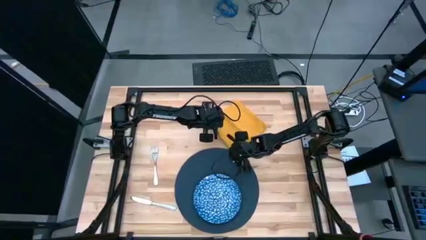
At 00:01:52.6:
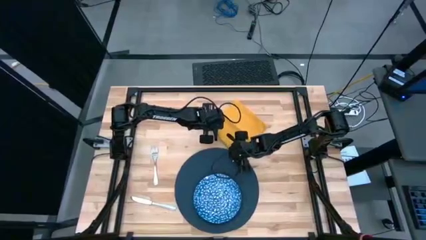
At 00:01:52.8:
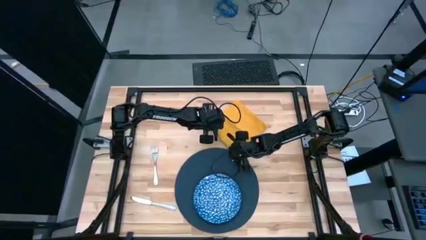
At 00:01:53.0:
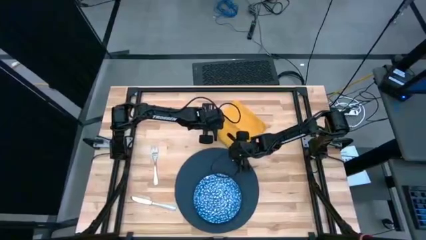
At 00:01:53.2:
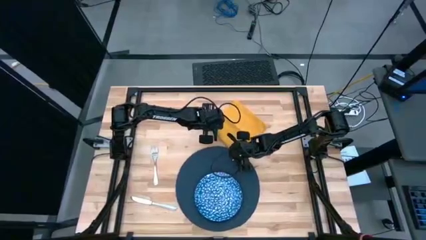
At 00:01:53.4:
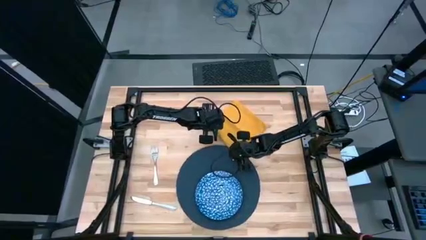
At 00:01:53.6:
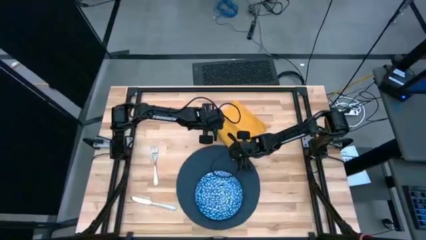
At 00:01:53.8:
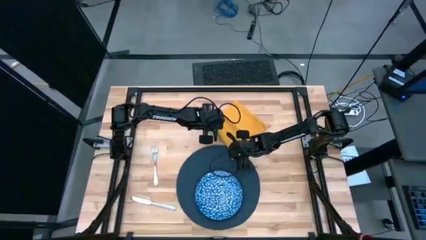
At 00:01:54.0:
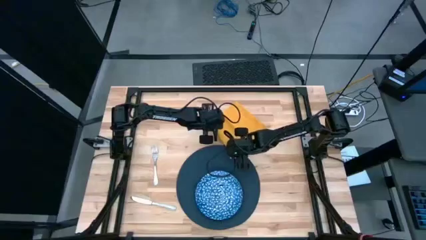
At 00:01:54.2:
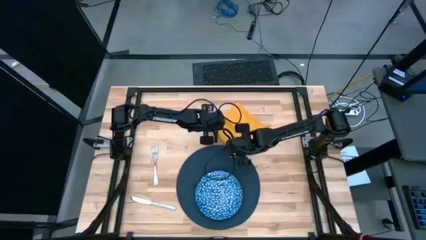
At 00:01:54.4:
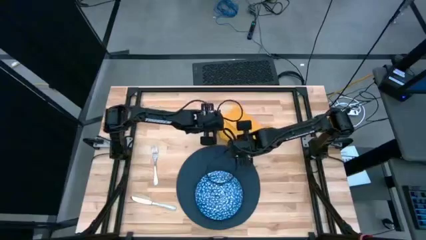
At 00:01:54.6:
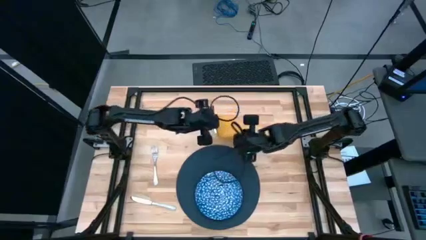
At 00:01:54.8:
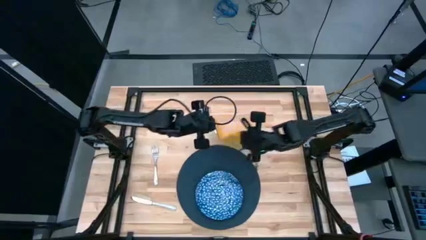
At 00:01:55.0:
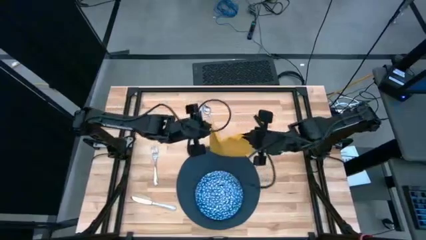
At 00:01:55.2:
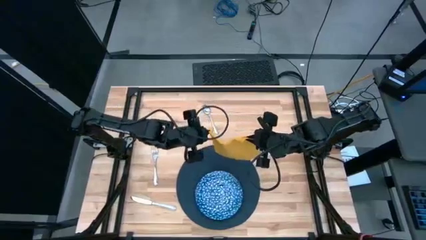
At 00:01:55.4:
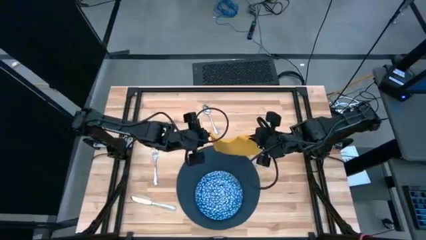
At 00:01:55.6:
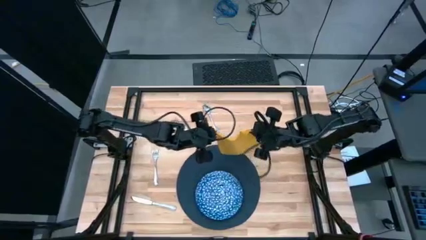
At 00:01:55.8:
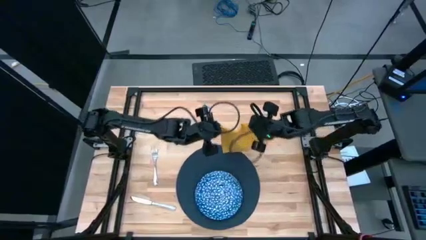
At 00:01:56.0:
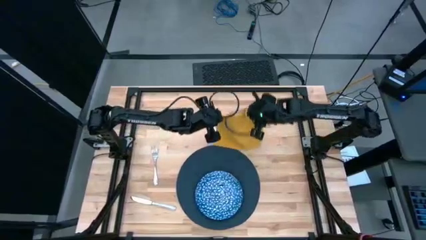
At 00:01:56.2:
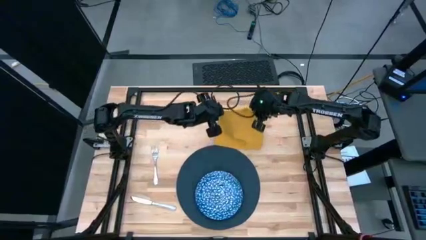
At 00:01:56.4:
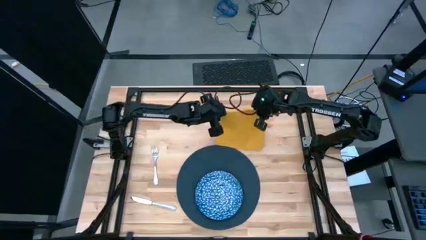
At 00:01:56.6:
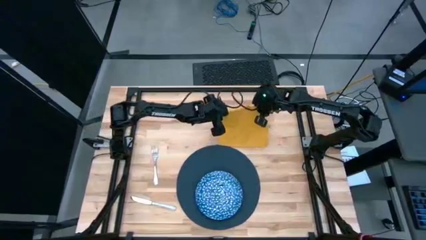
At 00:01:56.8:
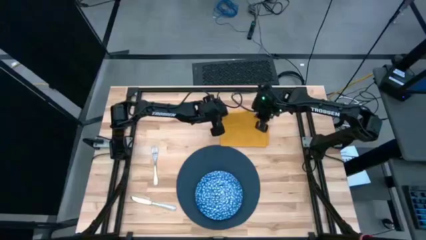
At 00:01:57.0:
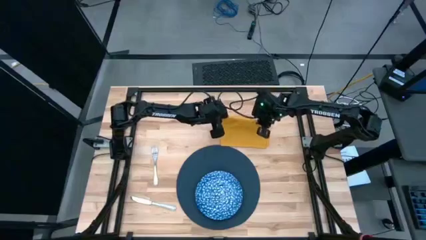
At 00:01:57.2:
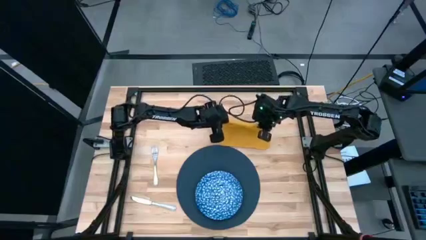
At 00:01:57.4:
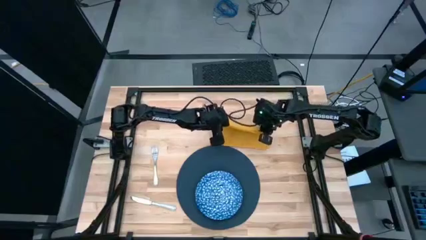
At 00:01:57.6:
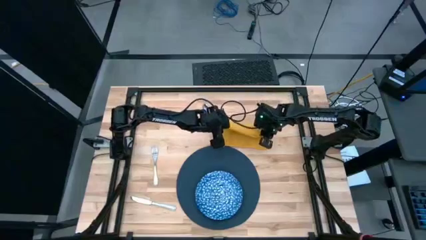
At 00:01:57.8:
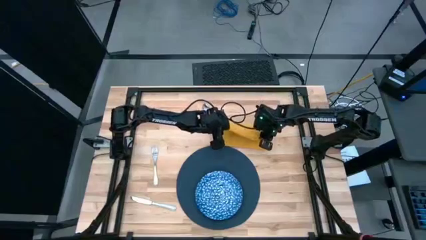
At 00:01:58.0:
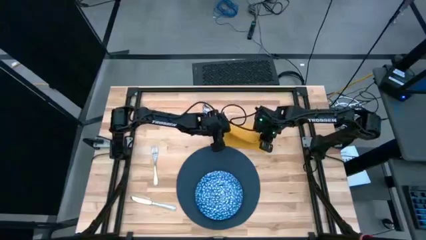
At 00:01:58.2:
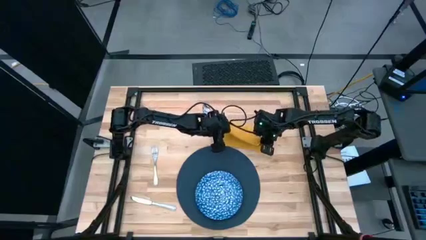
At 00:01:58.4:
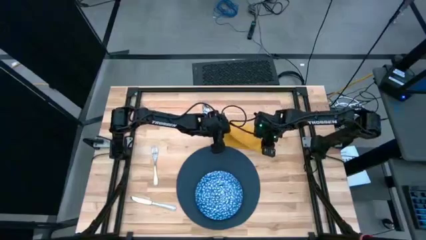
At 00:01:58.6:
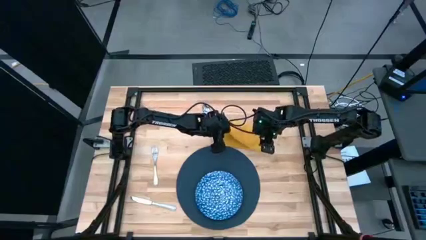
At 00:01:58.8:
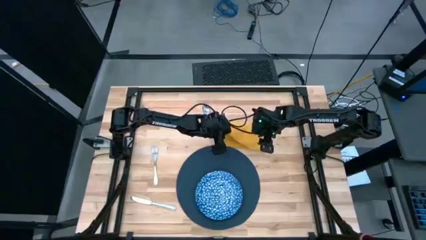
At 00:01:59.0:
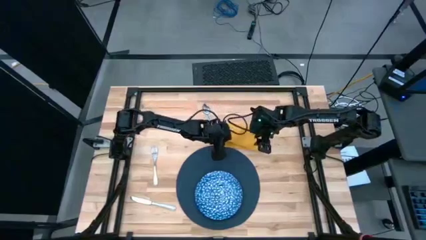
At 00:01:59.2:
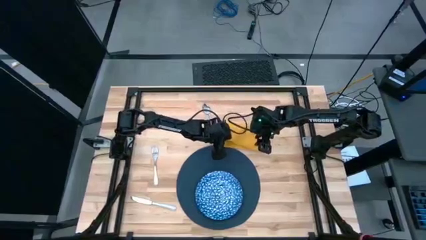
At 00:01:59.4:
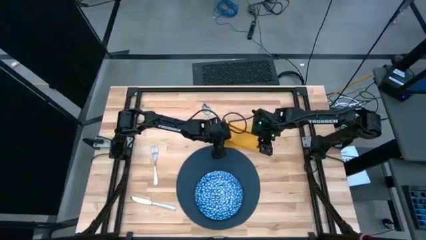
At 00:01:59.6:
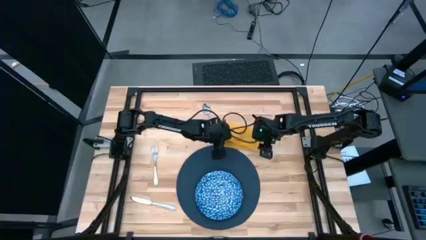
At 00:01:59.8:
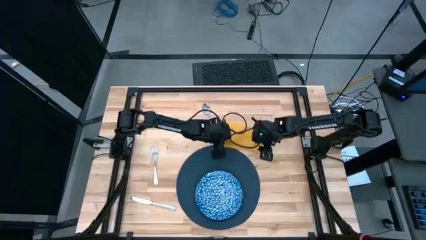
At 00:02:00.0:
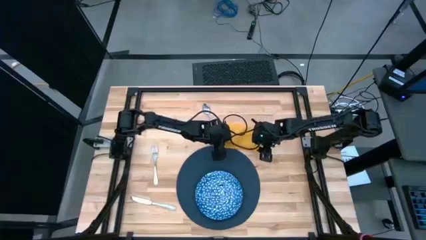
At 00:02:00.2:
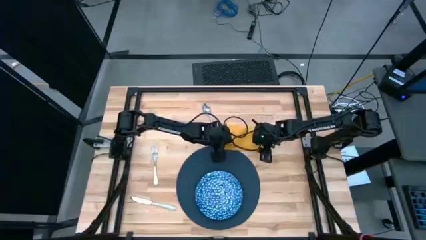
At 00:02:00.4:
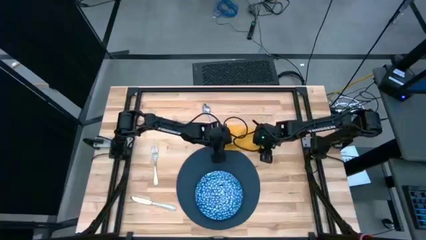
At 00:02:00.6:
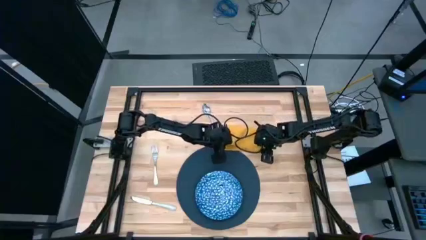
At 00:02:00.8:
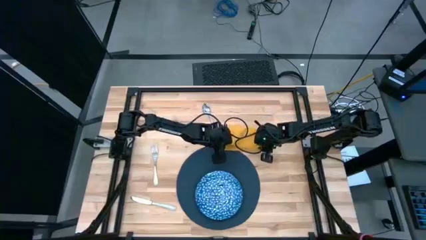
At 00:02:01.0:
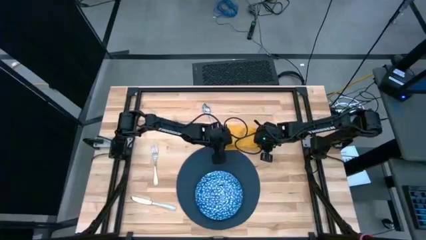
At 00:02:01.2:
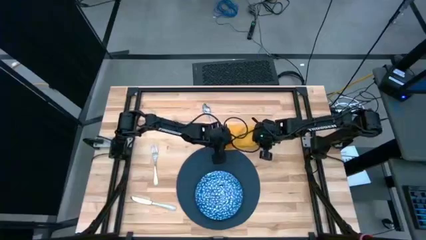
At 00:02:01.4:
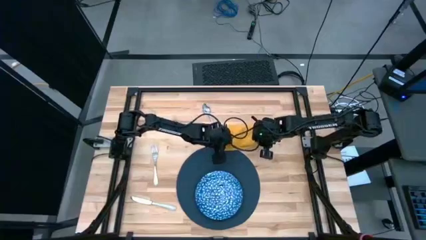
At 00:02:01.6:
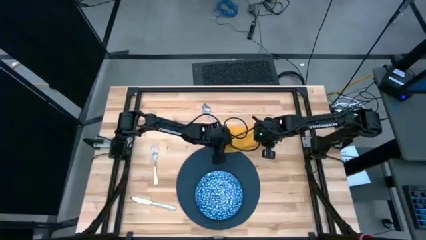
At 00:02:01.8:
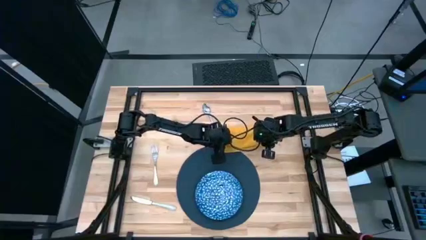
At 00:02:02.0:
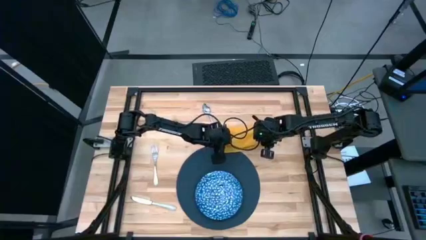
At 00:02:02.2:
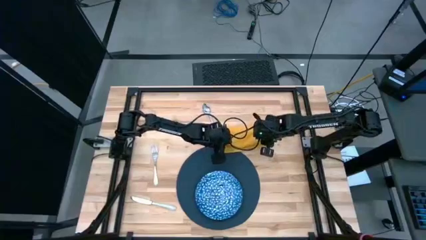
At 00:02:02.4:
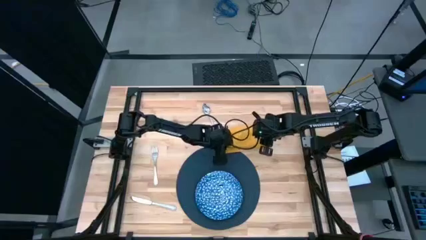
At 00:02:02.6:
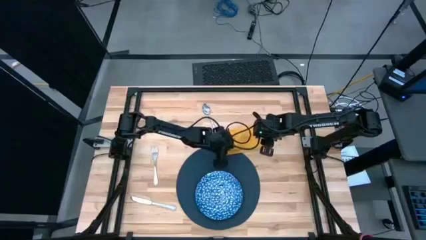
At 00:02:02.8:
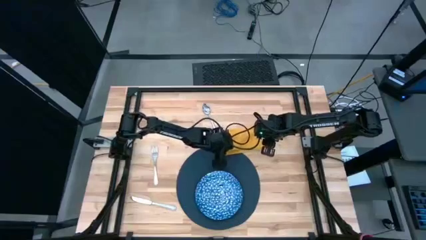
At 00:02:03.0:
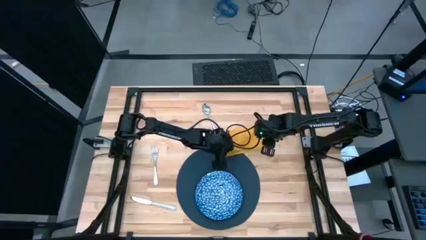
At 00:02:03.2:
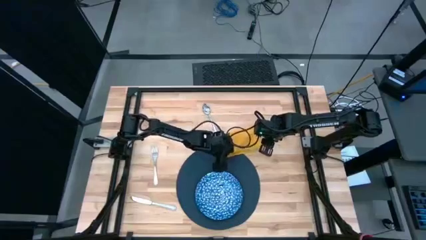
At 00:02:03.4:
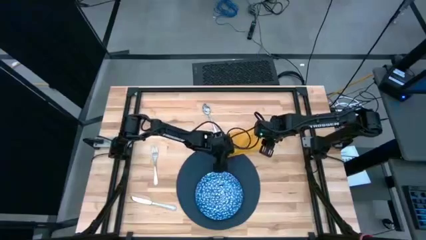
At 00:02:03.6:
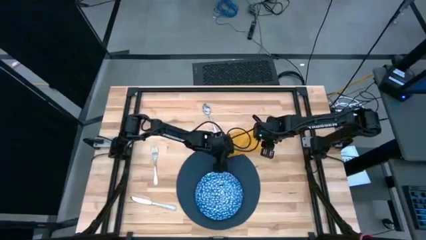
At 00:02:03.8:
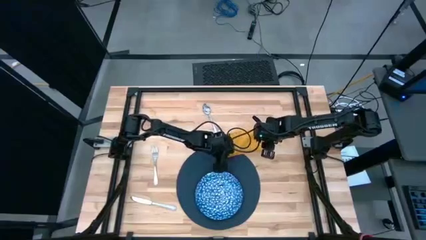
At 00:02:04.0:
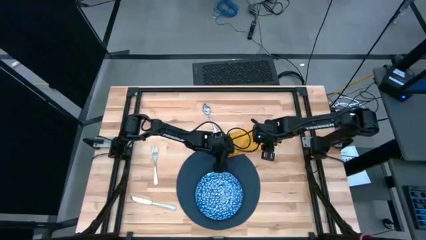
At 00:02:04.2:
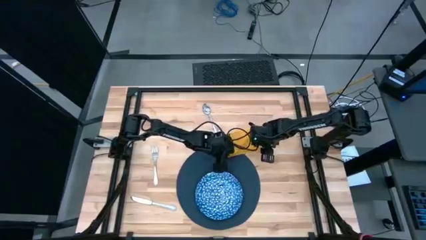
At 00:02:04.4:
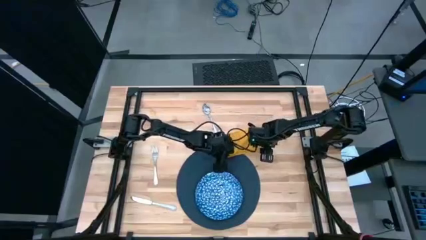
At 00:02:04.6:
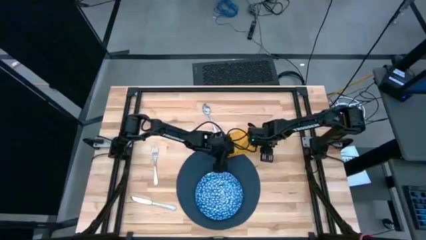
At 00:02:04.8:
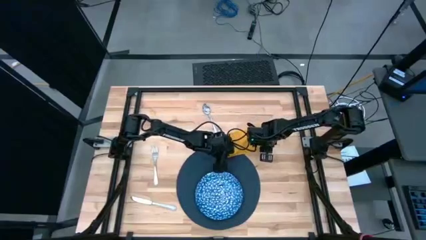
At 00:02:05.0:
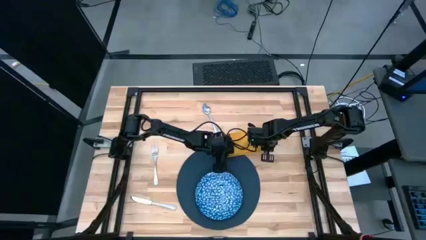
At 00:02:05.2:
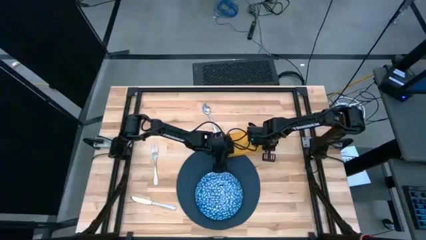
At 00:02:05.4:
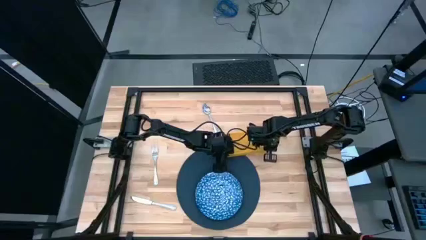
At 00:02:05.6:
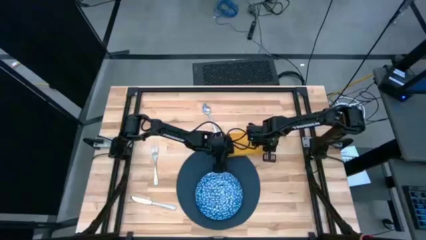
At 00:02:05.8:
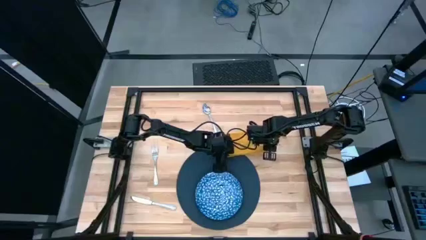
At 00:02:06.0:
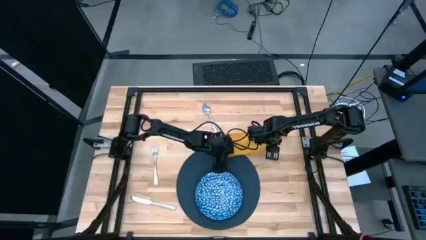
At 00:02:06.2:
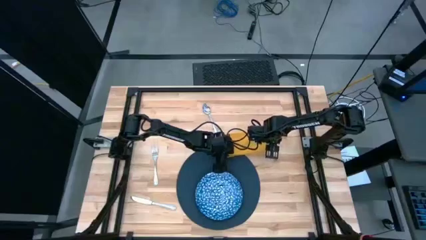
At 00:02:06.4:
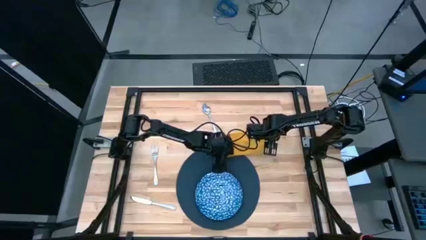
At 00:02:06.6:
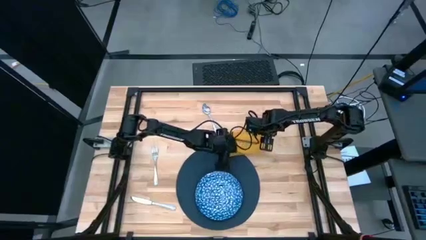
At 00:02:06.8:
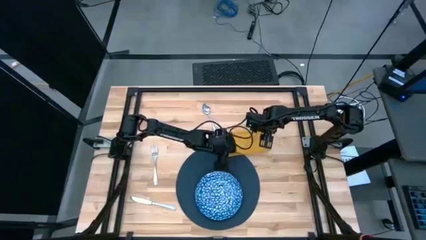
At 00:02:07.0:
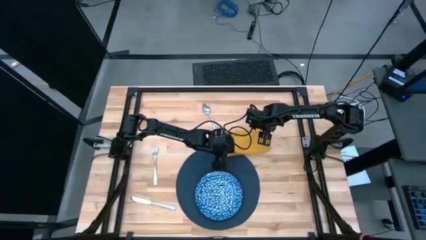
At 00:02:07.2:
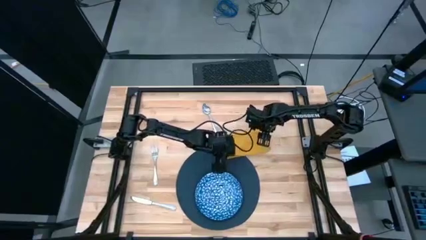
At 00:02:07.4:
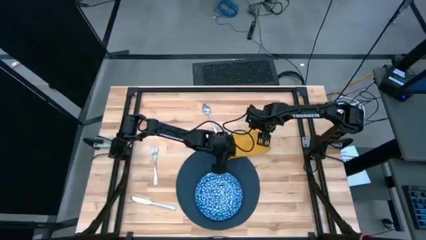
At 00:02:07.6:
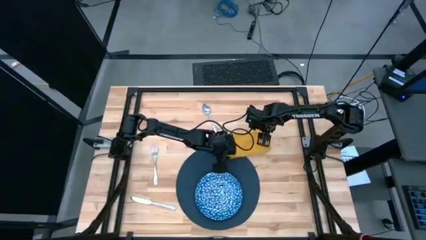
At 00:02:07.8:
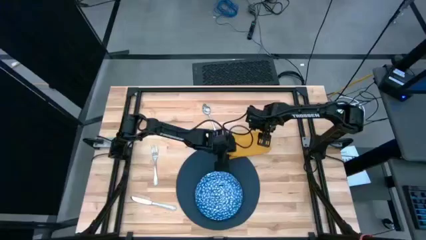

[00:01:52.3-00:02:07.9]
Task: Set table place
Fold the yellow table napkin
